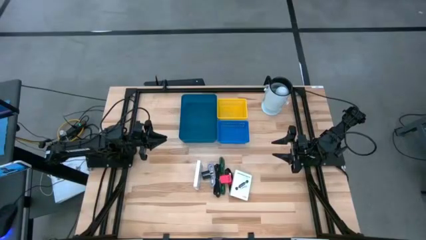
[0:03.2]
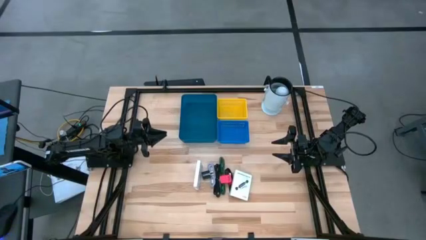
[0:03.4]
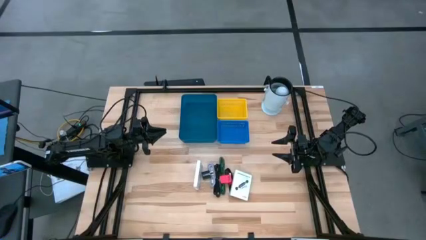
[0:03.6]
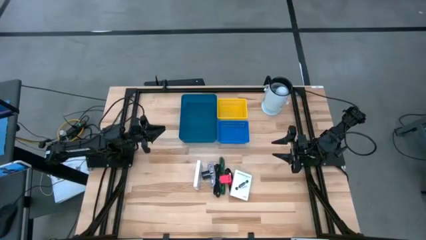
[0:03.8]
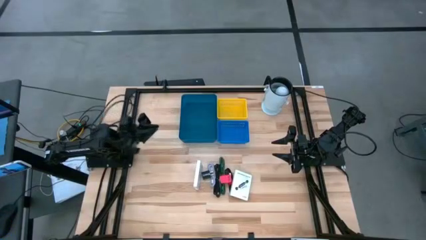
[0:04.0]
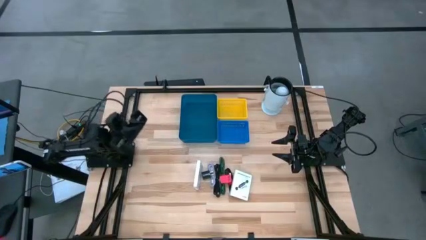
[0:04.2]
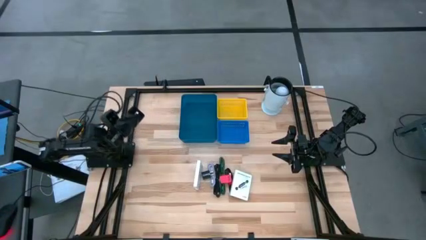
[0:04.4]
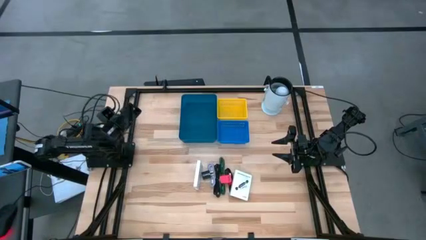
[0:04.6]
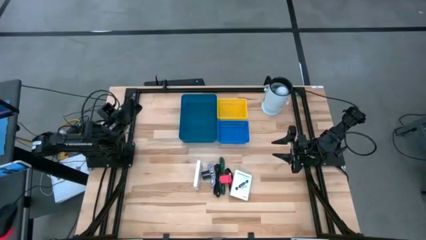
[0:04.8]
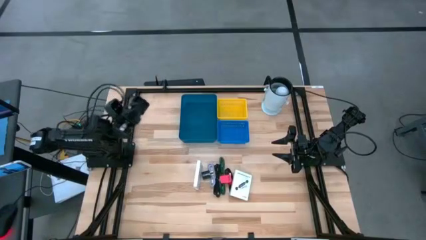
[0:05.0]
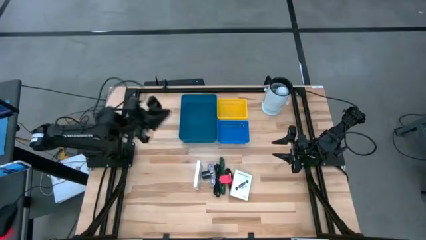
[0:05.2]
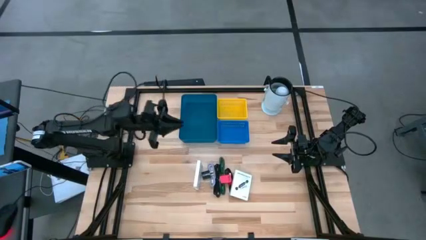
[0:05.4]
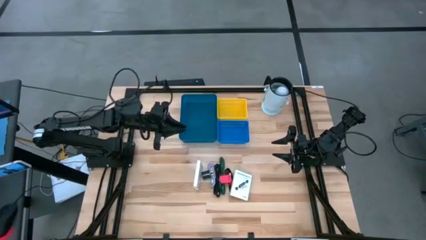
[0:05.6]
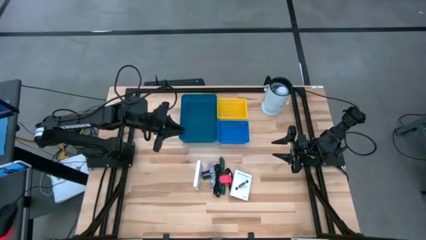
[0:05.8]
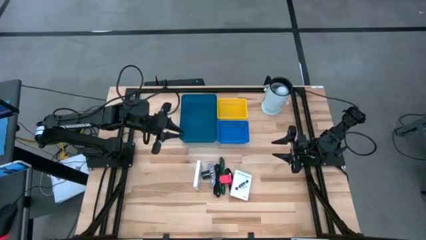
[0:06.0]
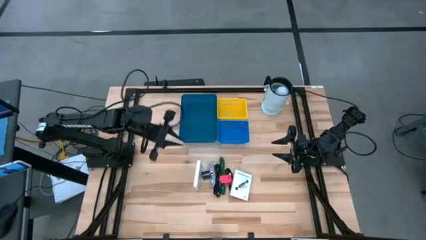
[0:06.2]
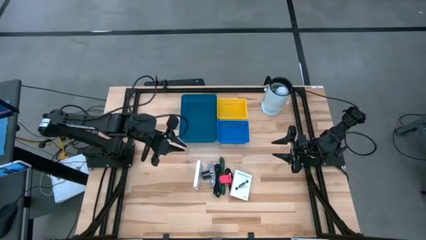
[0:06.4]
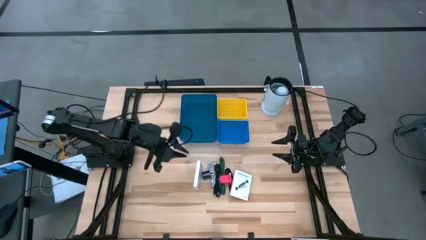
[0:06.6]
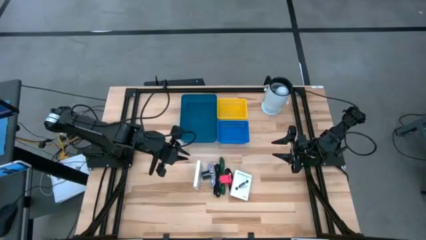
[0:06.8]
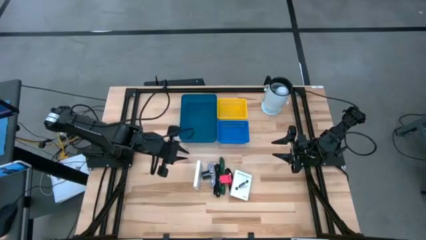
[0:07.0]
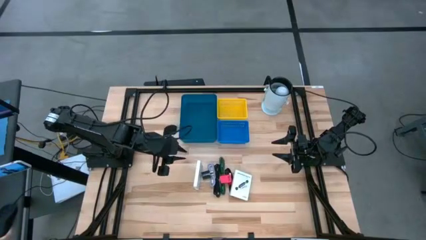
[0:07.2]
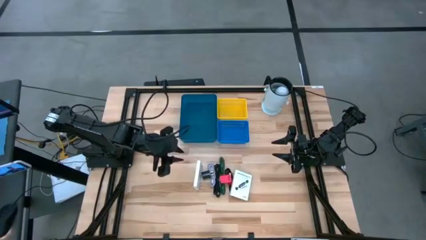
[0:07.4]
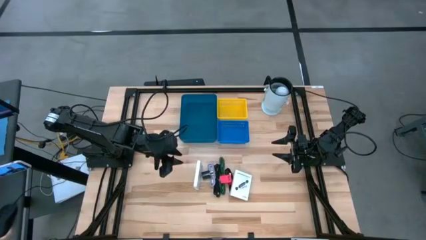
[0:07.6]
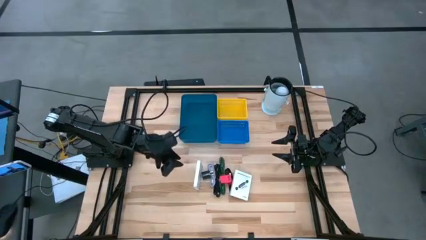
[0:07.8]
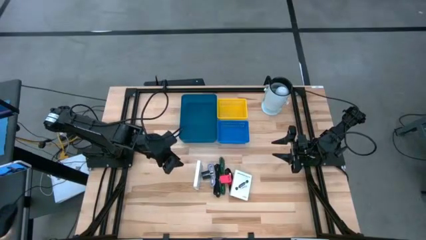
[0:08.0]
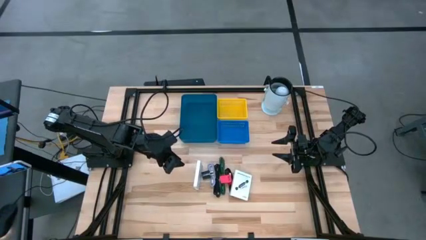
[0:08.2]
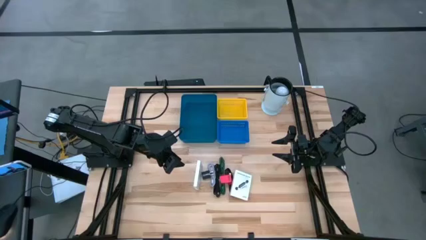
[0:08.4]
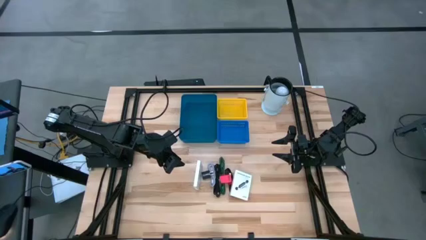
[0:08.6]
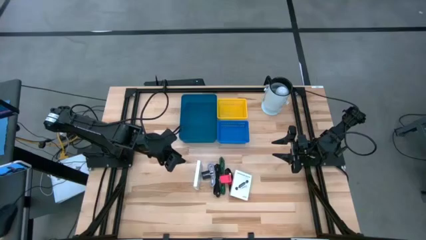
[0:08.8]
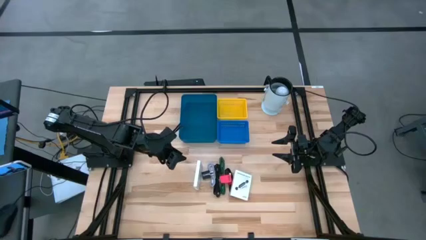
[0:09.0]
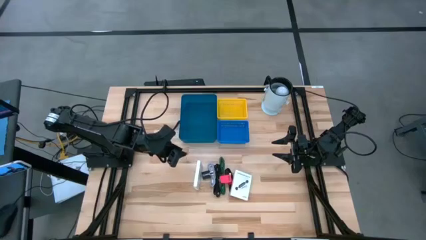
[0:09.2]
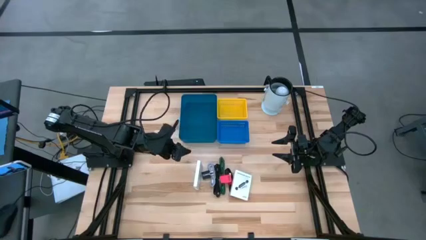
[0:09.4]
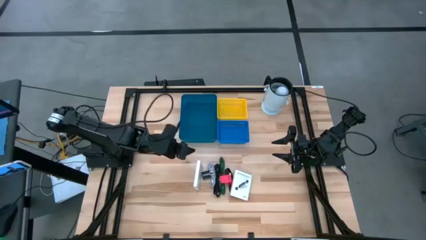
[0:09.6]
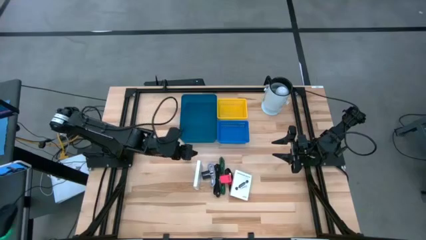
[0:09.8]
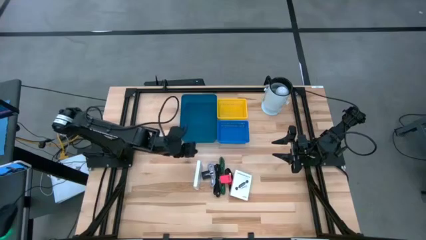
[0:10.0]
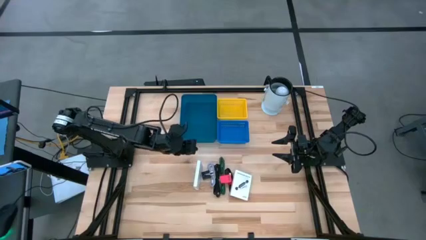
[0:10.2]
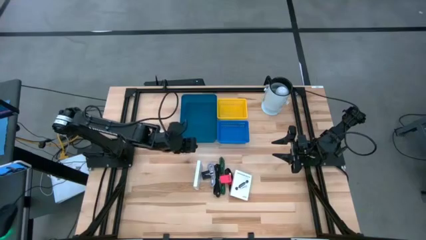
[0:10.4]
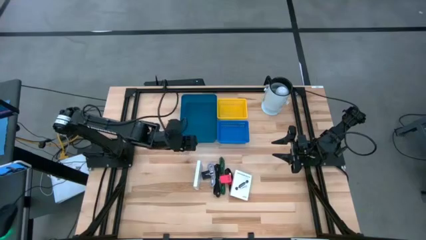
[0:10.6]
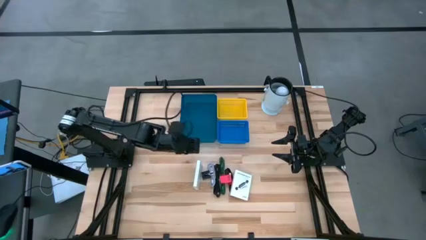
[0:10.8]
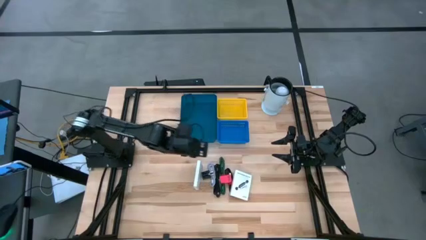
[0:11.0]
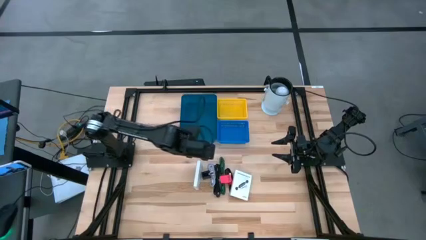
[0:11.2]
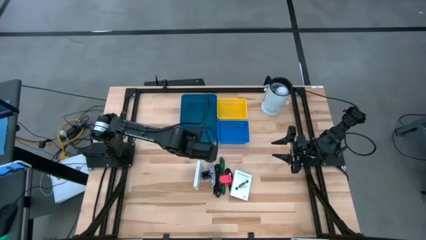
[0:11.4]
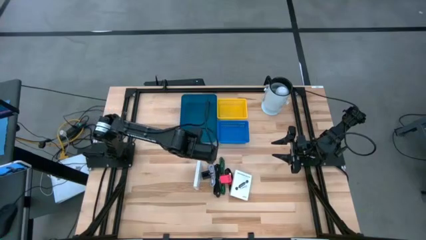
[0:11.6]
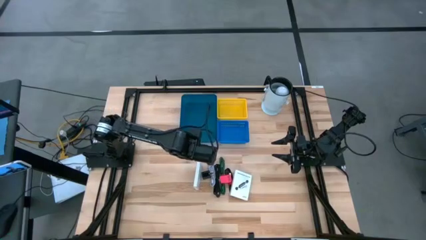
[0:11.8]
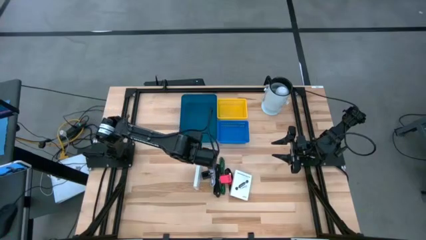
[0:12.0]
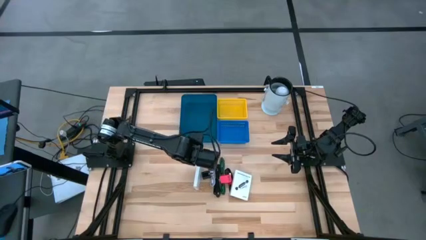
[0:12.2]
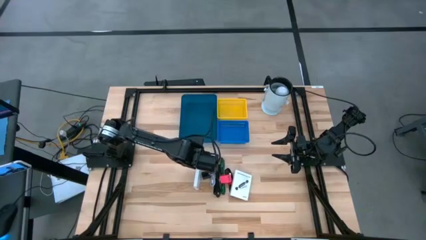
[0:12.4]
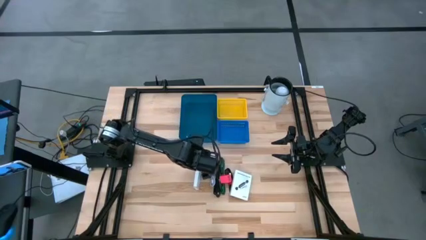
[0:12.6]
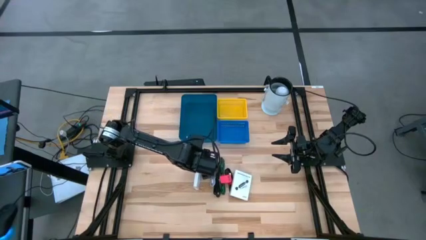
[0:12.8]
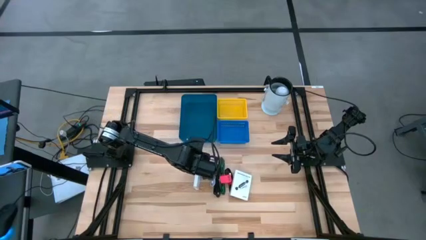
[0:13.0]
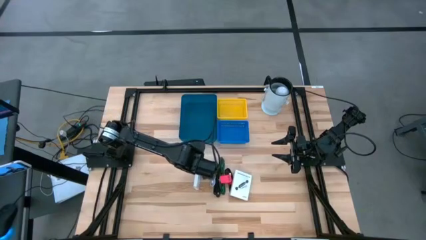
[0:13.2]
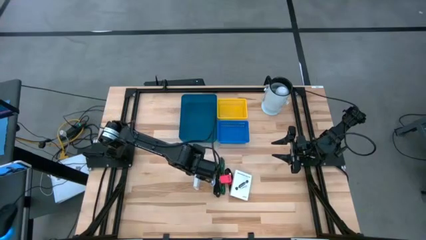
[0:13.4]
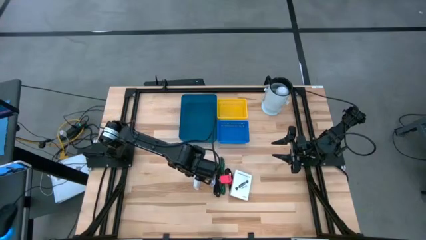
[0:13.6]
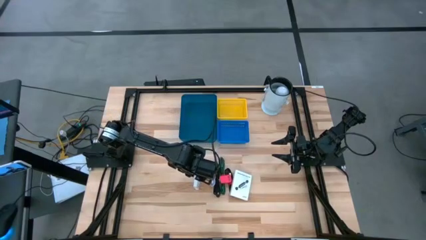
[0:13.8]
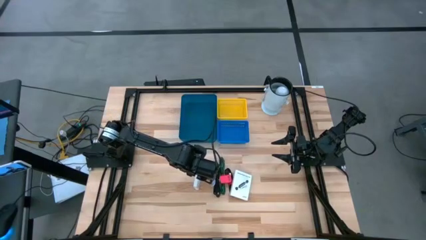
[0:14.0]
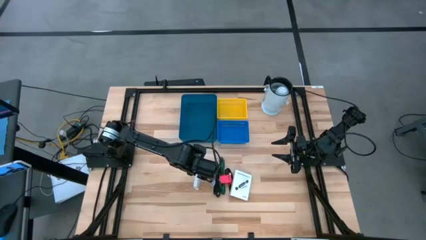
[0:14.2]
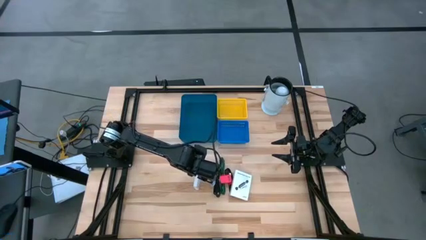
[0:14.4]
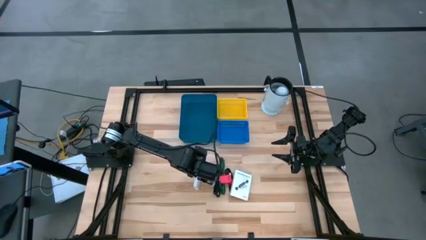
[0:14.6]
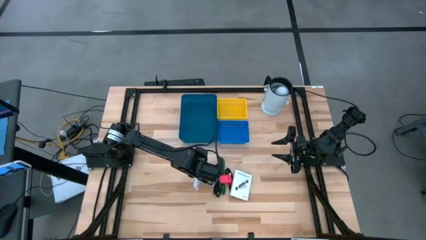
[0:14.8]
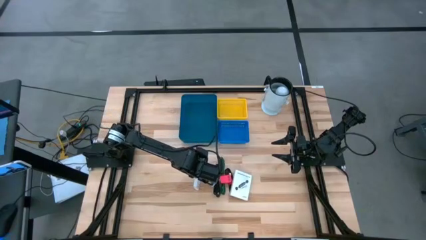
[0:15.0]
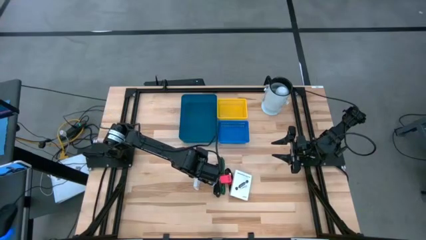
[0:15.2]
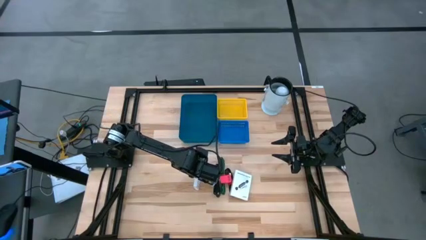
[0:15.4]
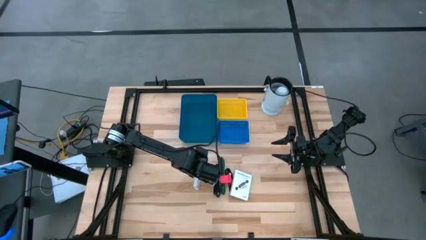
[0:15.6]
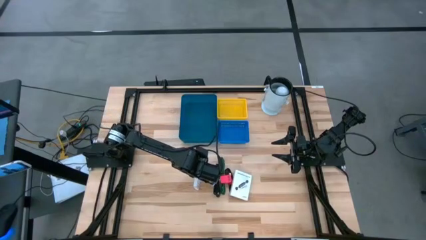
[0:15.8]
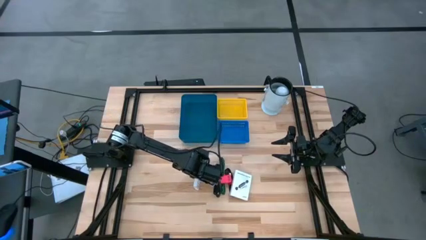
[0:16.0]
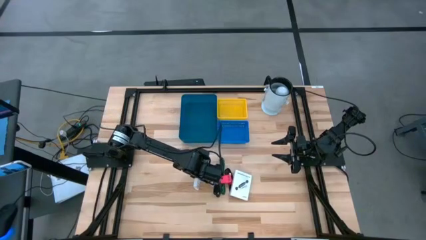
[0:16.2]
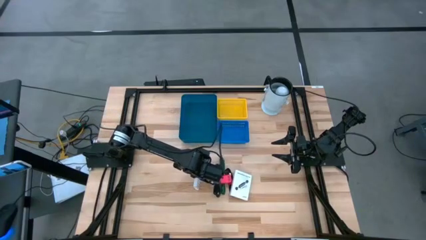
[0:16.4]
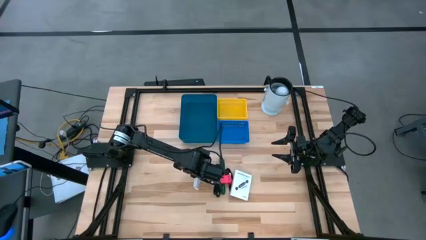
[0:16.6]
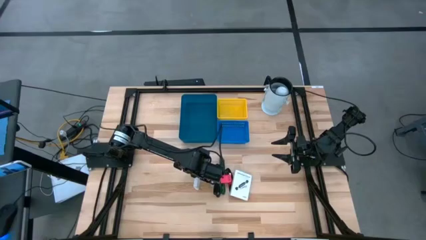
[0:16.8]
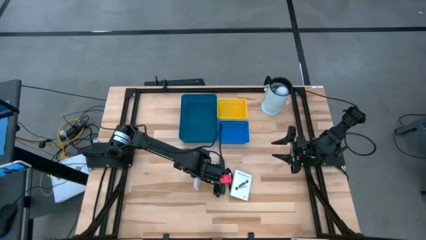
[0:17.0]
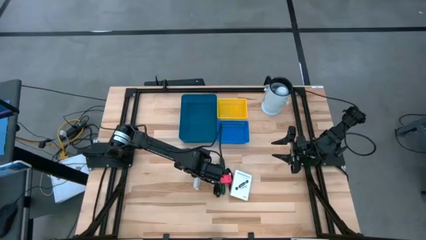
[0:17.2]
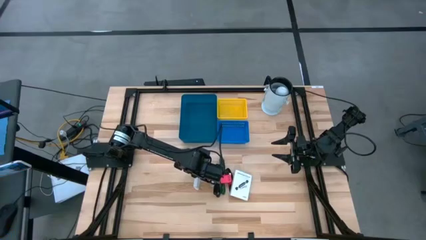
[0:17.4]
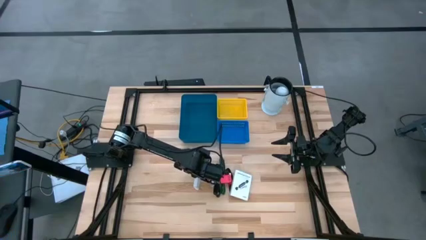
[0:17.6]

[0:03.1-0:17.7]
Task: Pick and place items into bin
Put the left card reader box into the yellow bin
